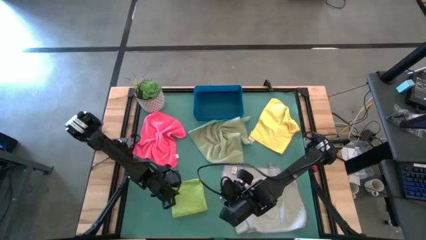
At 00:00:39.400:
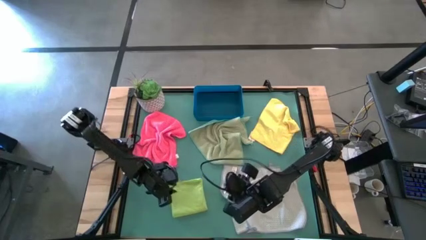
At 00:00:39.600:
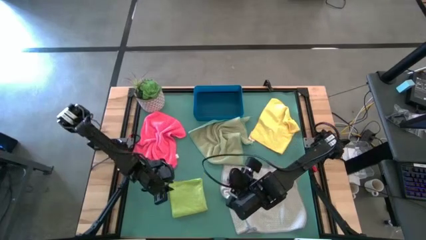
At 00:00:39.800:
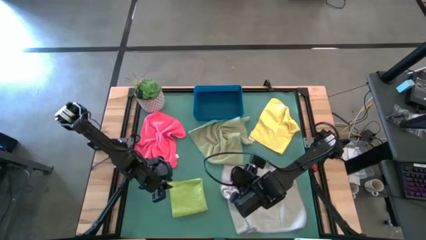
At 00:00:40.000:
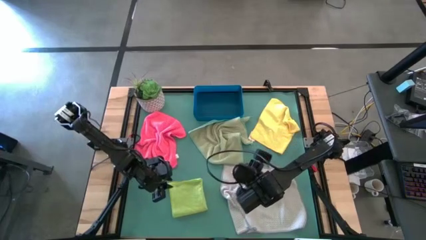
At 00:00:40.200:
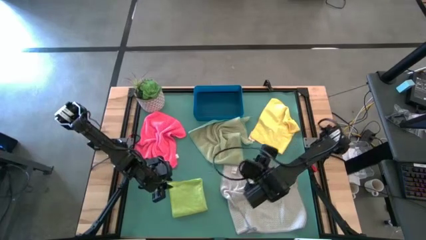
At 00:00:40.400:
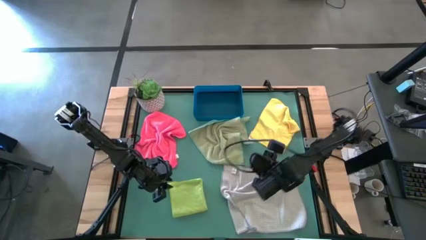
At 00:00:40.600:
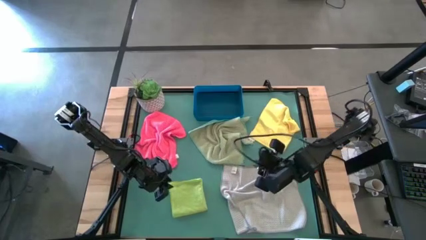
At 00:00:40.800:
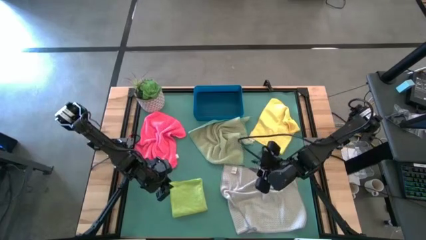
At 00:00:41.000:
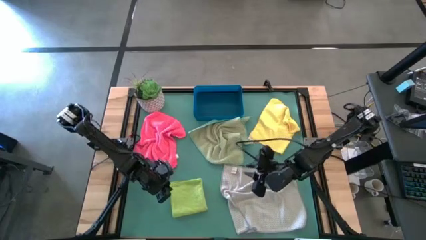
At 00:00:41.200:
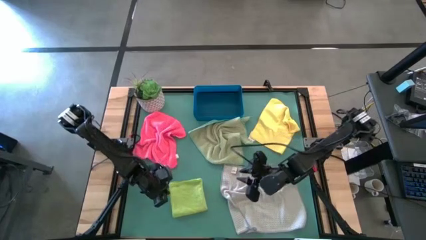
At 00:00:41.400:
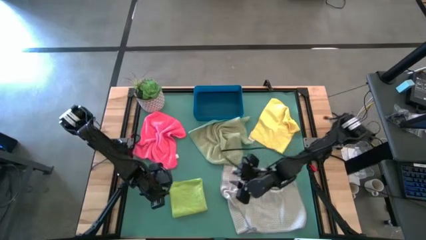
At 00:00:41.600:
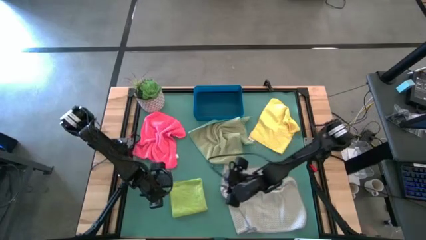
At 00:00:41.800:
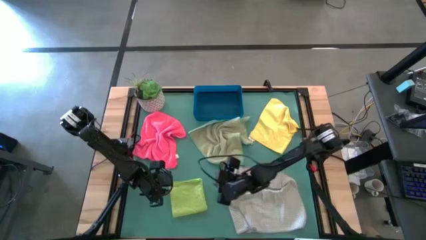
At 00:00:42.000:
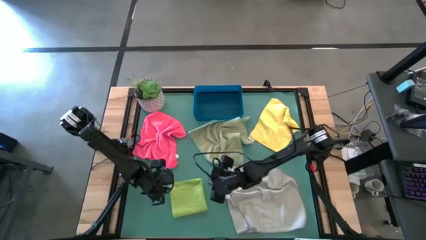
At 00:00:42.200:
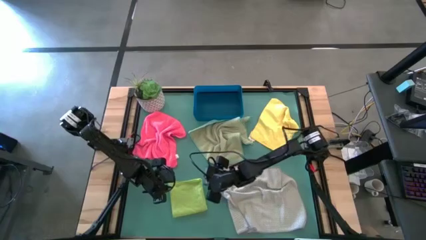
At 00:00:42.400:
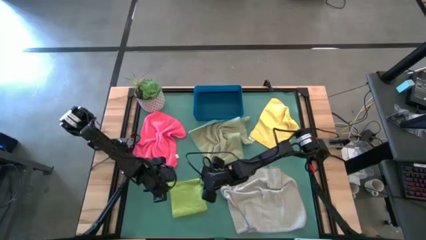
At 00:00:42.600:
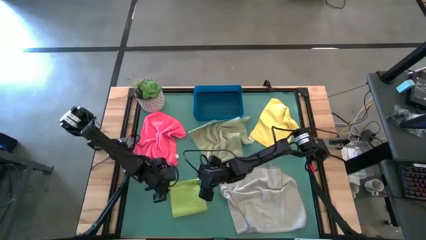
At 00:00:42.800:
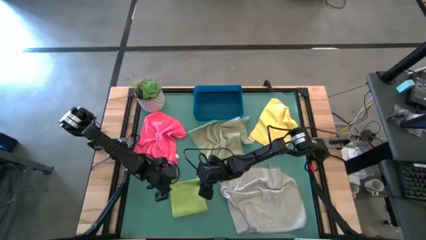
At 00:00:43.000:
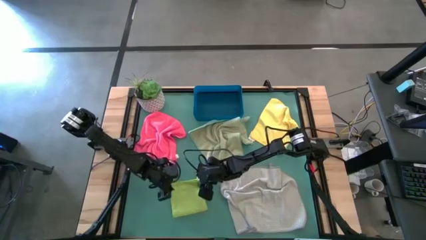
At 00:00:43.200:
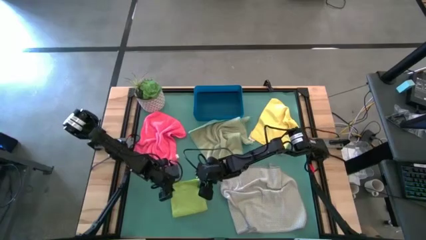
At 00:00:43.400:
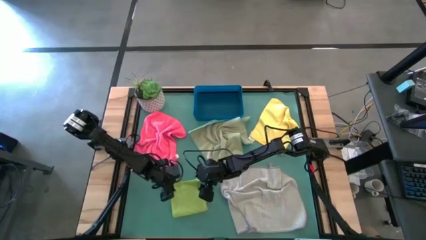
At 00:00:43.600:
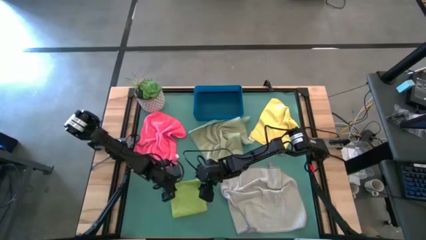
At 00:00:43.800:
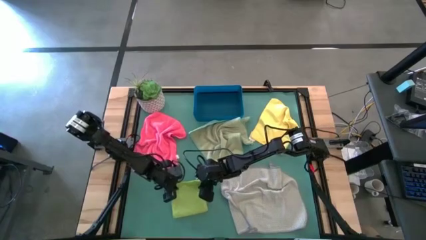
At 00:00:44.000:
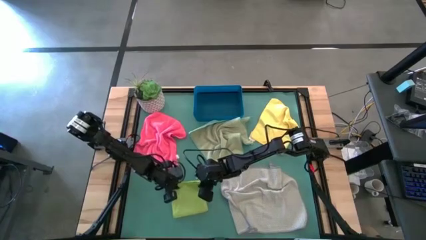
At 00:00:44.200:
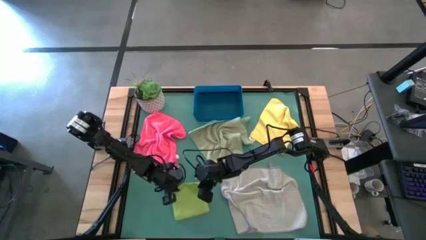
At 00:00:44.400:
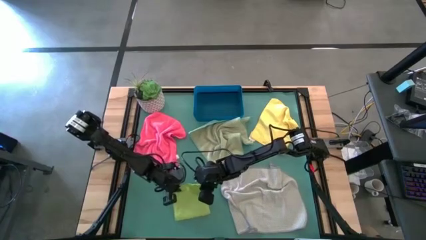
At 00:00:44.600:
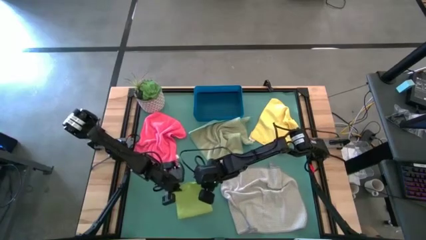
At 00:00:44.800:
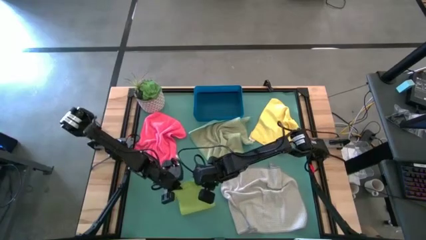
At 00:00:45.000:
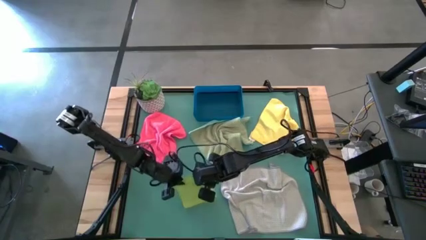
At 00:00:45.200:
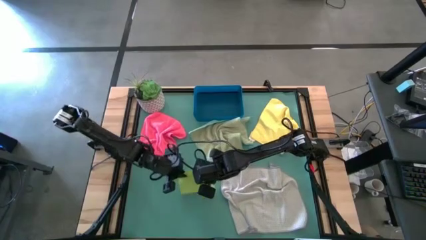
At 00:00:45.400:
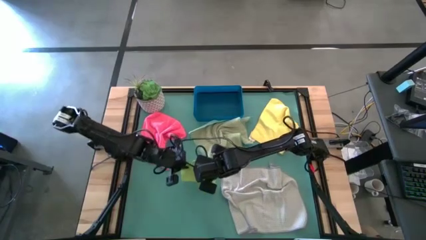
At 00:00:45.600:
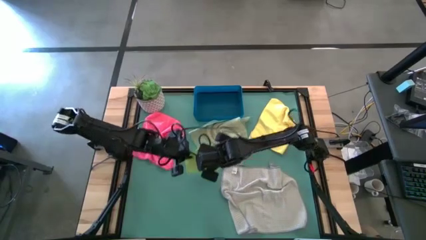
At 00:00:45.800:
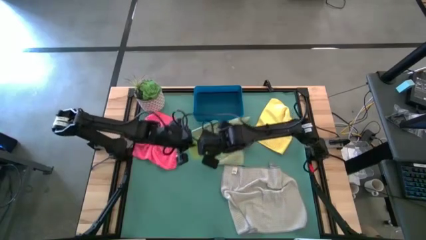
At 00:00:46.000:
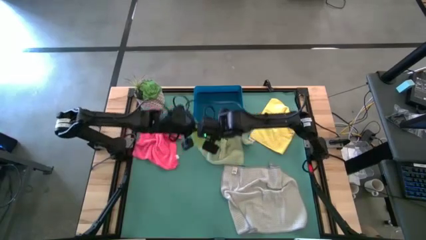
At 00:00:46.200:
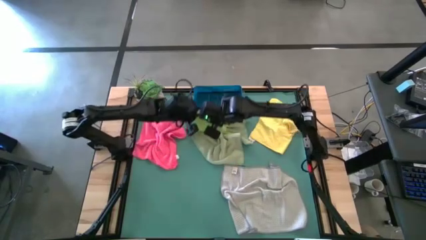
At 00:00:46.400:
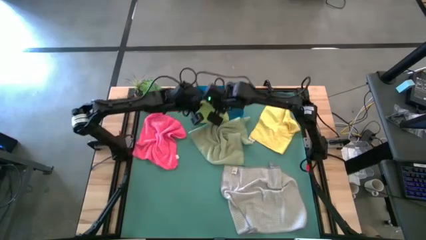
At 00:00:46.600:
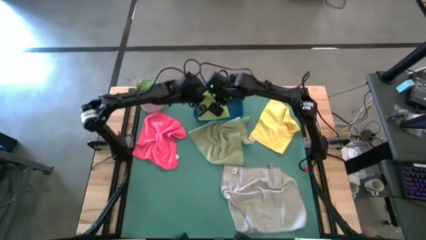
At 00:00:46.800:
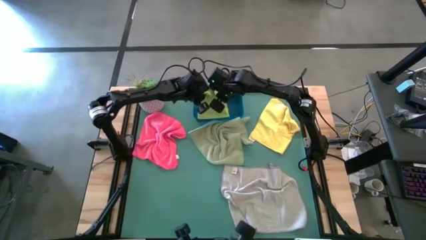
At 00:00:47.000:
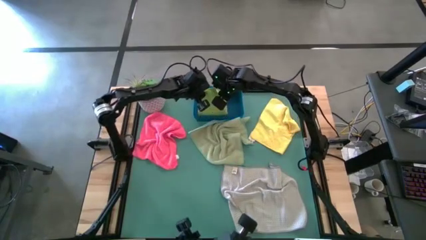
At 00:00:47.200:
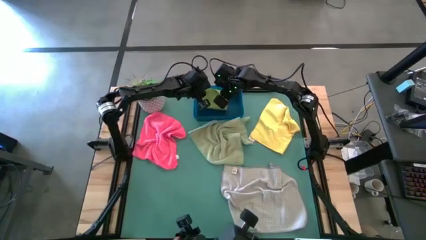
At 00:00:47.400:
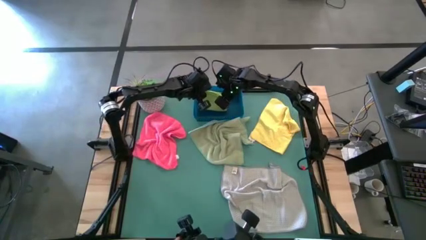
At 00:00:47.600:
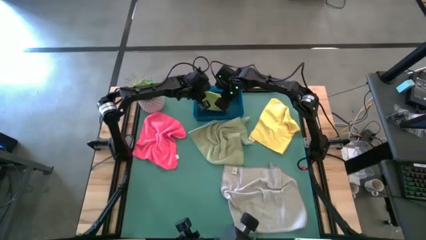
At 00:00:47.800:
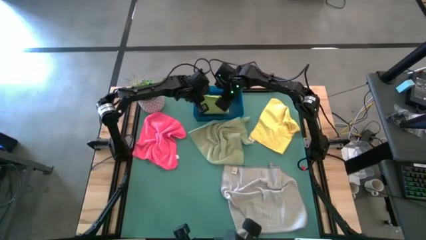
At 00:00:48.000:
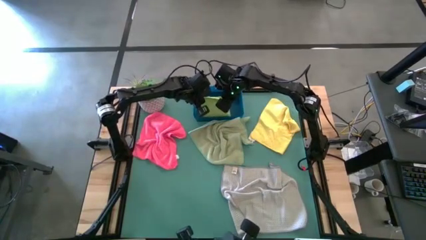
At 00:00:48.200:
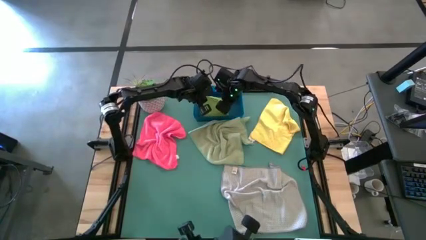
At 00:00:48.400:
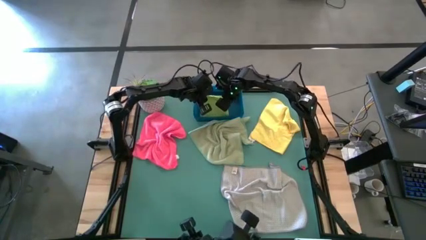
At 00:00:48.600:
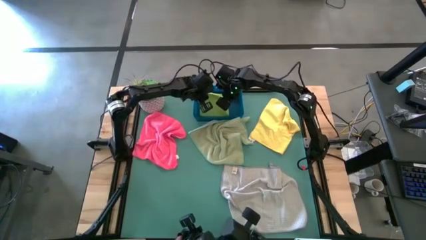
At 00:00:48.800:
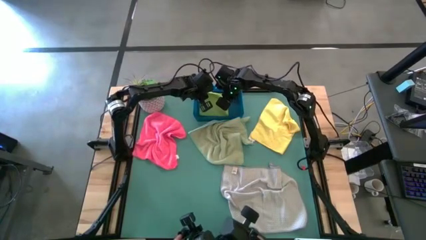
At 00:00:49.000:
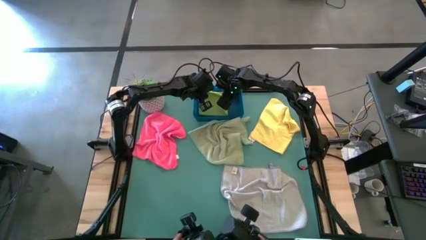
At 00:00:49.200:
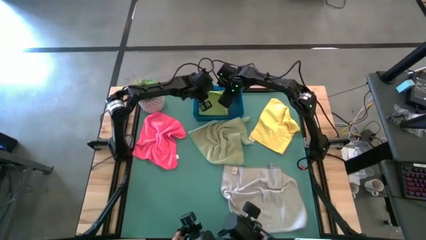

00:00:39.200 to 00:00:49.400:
Task: Fold microfiber towels
Put the folded green microfiber towel into the blue bin

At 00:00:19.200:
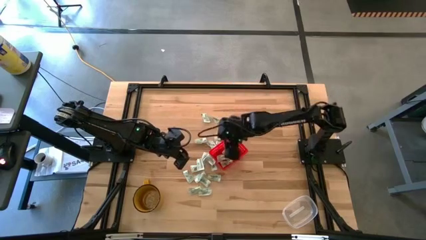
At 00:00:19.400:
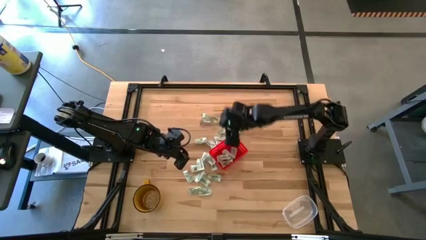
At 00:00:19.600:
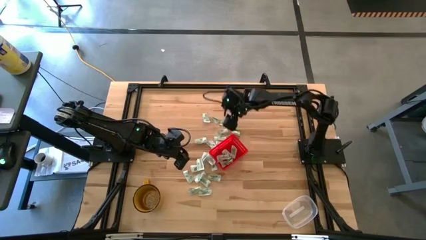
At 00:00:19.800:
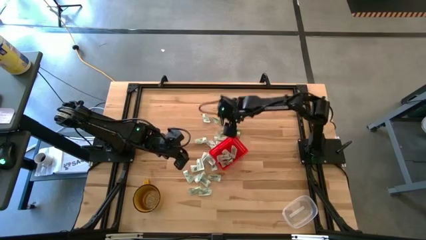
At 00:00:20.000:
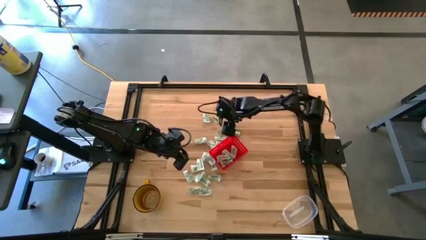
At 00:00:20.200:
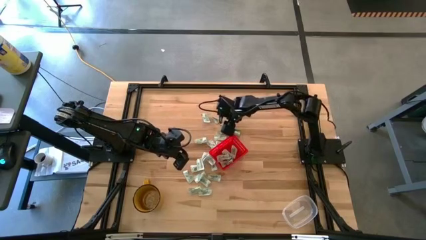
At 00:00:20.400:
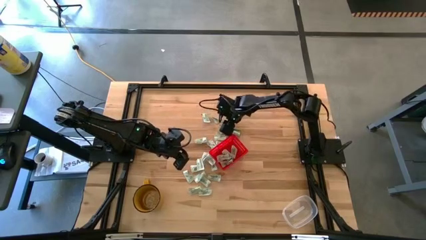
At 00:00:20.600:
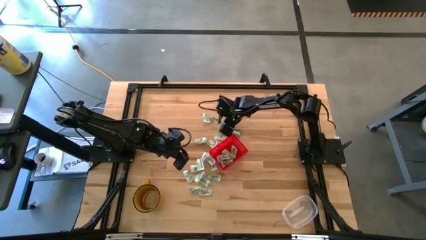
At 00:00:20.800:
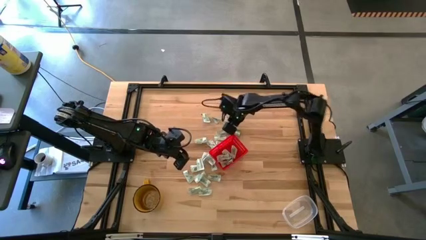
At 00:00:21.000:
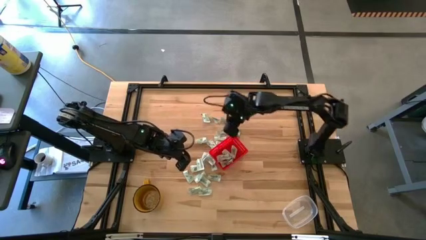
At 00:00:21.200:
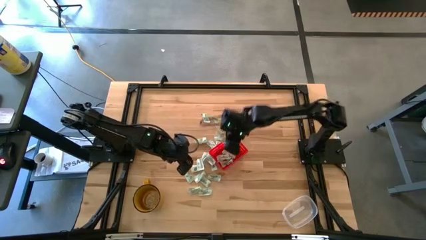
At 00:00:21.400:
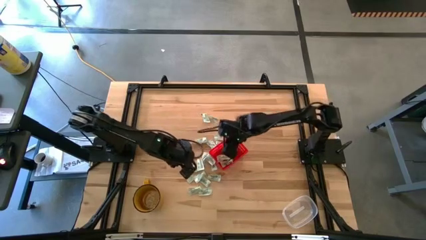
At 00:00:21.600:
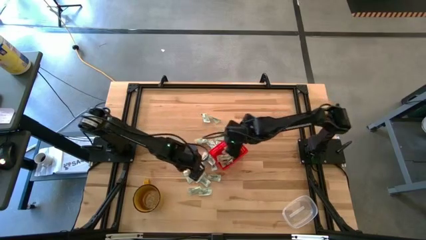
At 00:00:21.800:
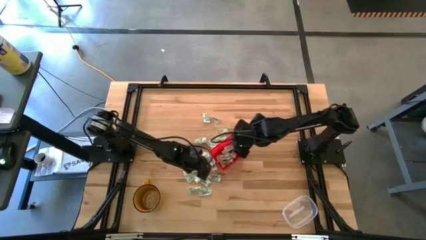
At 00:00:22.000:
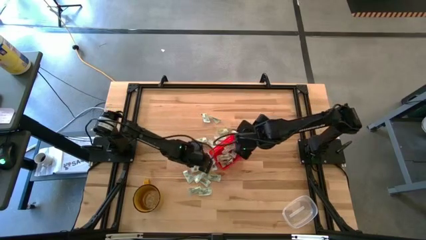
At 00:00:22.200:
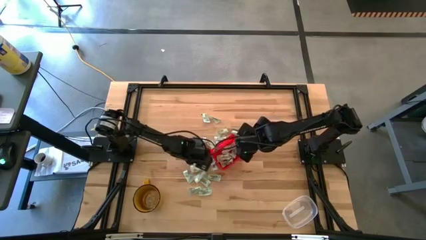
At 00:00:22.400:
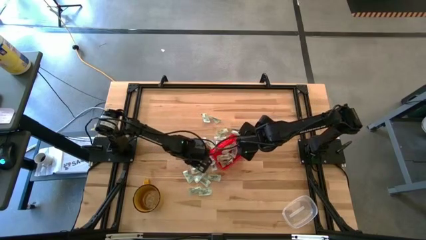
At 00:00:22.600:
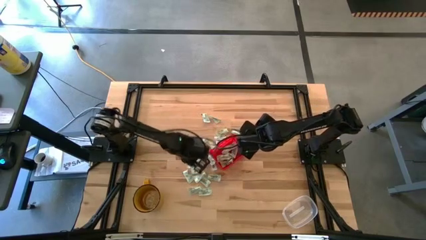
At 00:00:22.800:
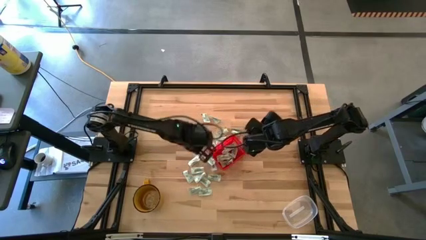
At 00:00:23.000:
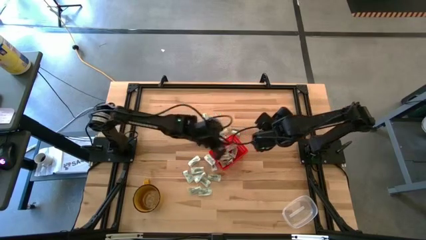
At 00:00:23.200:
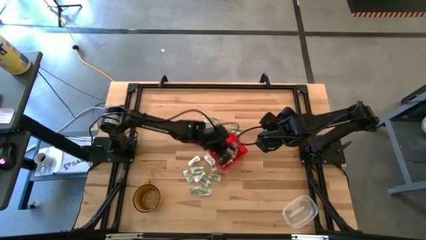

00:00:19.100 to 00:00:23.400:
Task: Pick and place items into bin
Put the light green stevia packet into the red bin

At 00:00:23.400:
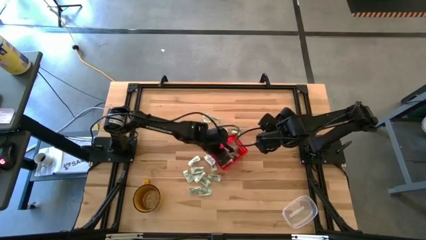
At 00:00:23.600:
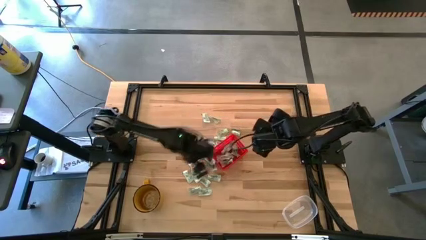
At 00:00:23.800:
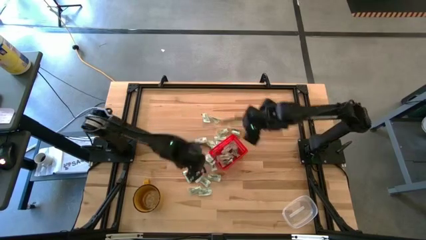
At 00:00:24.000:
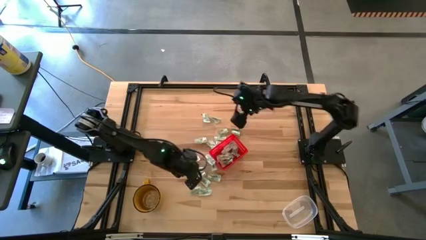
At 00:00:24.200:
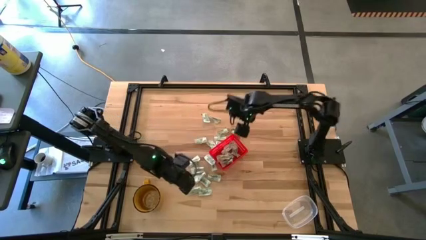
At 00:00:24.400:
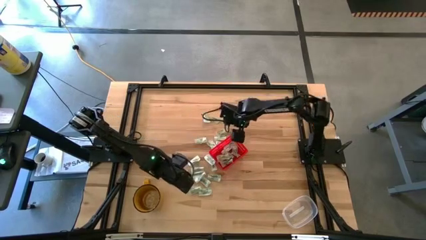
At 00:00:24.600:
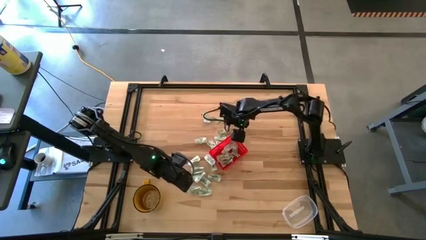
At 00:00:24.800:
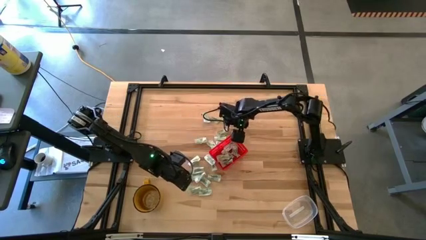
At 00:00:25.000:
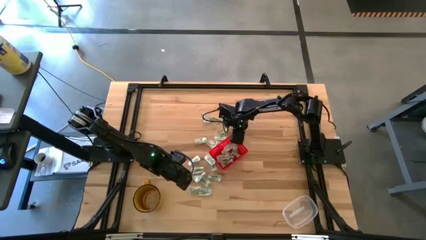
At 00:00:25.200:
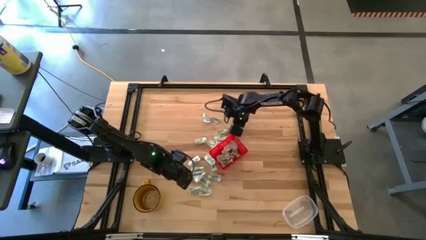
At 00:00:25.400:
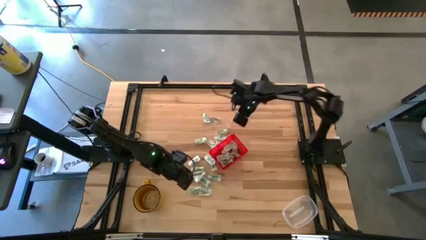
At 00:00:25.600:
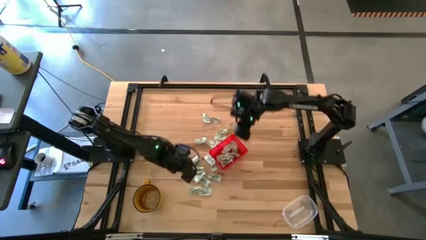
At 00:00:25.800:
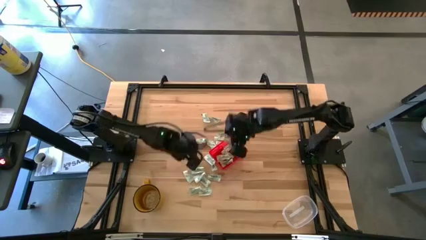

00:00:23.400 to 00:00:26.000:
Put the green stevia packet into the red bin

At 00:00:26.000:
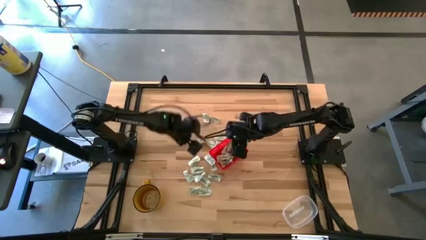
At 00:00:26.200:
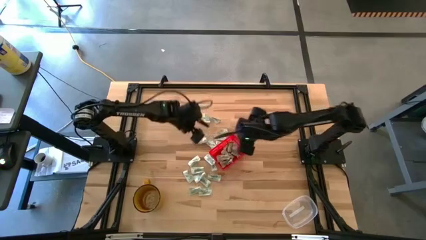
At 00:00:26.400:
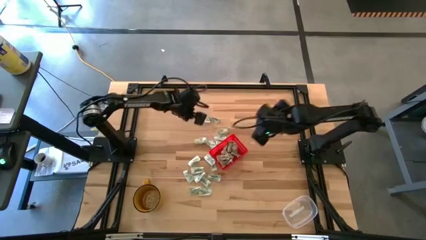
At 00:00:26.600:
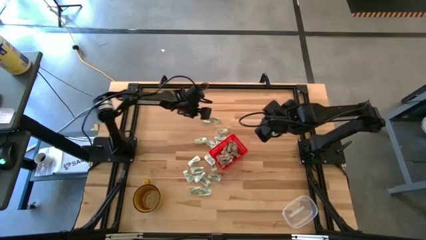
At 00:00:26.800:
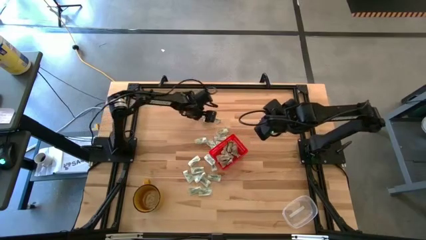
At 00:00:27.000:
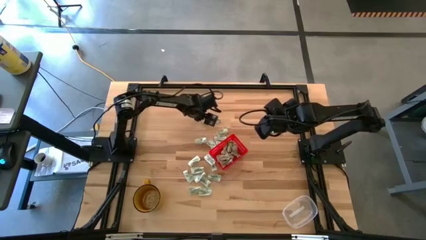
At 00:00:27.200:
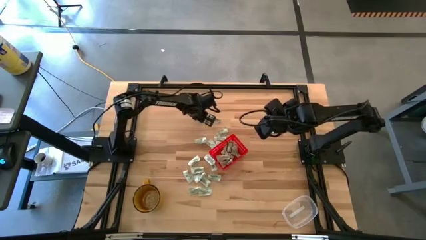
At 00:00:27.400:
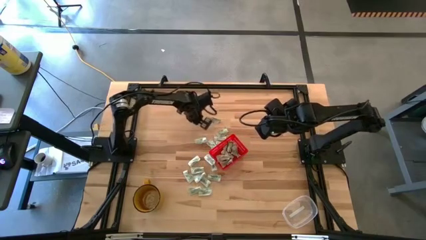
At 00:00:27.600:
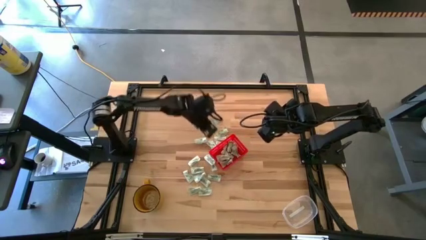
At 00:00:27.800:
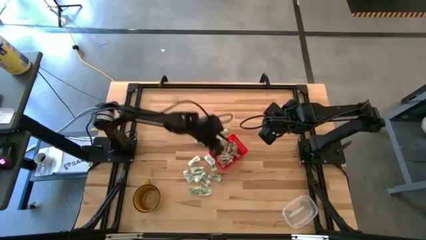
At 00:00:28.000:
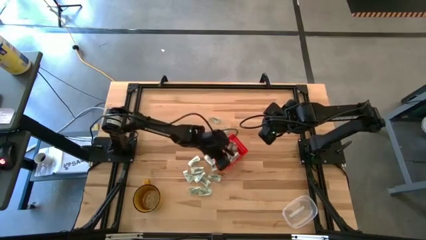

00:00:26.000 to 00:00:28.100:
Put the light green stevia packet into the red bin
